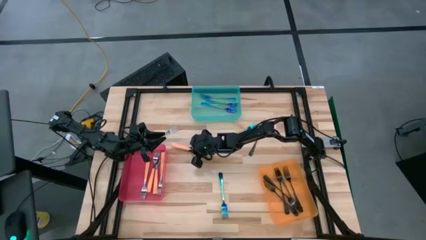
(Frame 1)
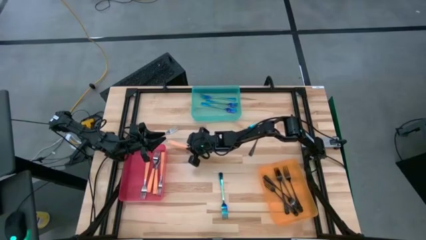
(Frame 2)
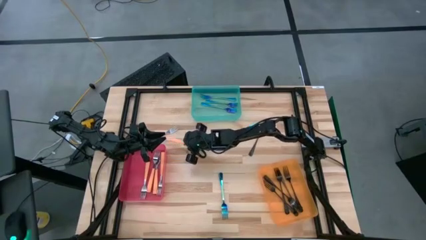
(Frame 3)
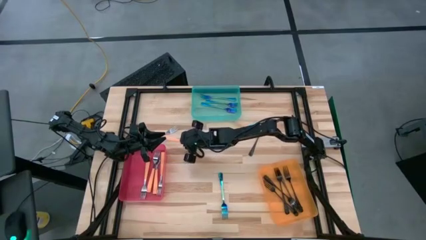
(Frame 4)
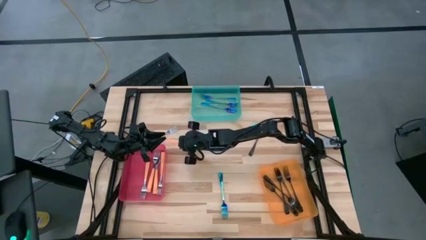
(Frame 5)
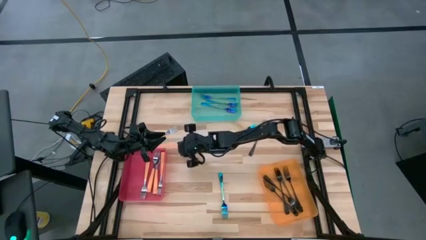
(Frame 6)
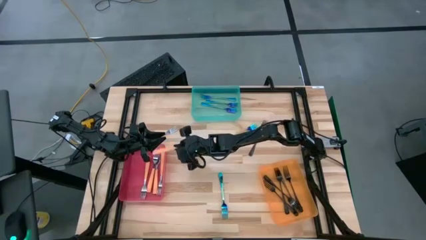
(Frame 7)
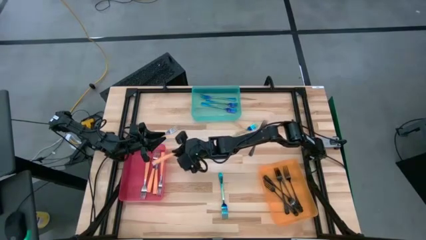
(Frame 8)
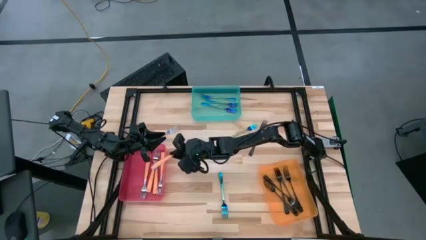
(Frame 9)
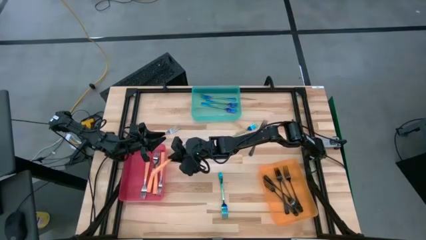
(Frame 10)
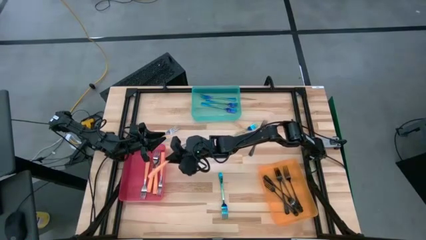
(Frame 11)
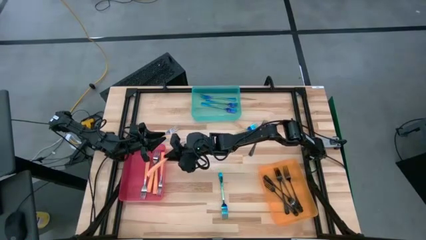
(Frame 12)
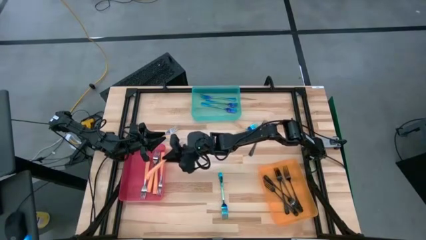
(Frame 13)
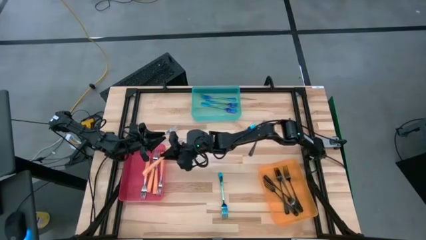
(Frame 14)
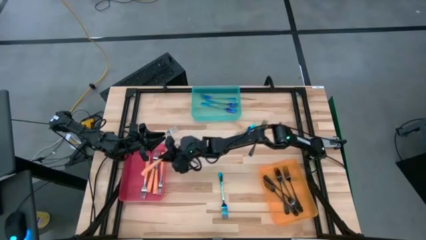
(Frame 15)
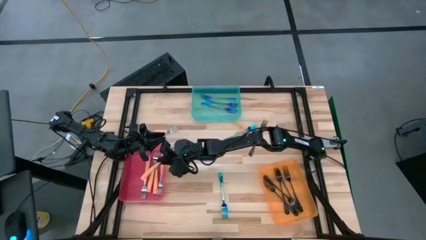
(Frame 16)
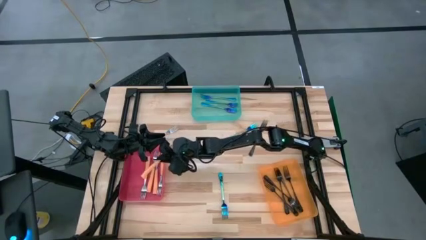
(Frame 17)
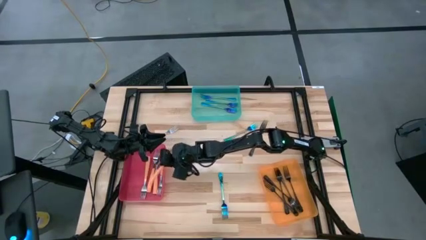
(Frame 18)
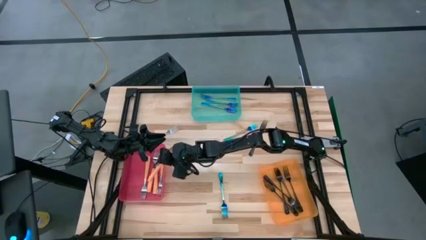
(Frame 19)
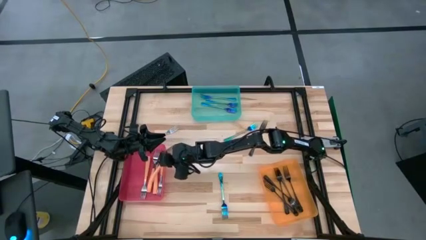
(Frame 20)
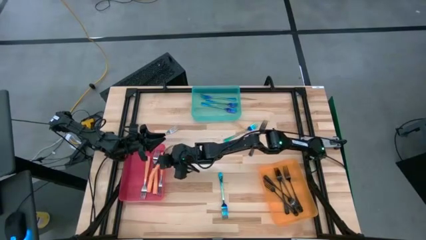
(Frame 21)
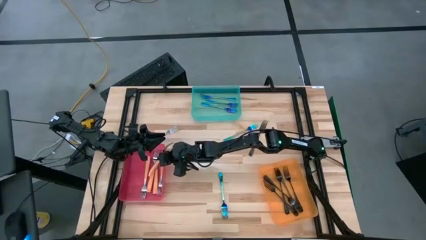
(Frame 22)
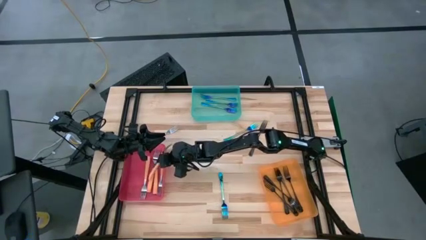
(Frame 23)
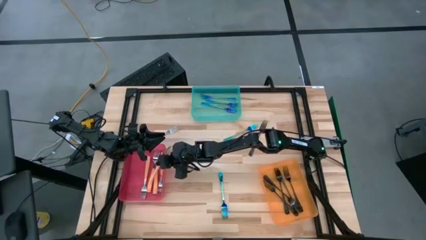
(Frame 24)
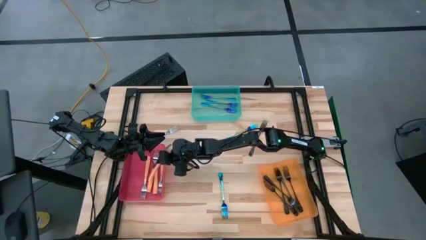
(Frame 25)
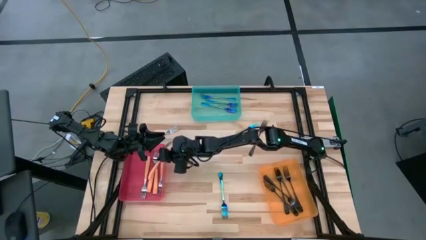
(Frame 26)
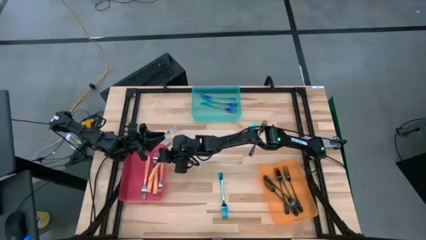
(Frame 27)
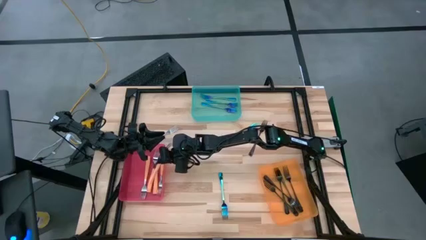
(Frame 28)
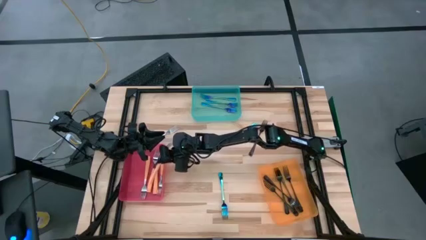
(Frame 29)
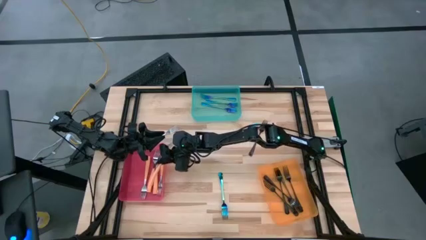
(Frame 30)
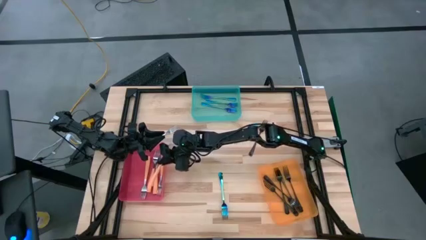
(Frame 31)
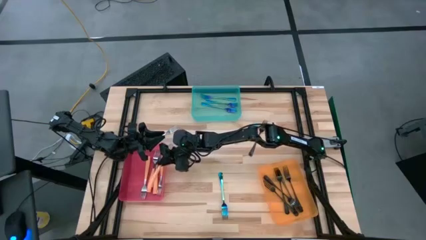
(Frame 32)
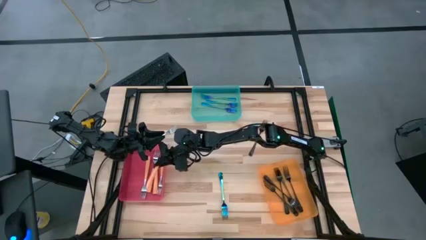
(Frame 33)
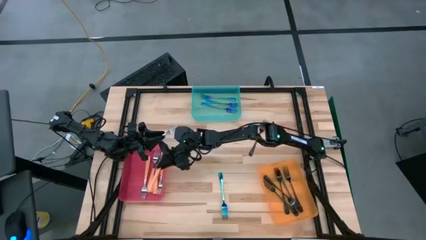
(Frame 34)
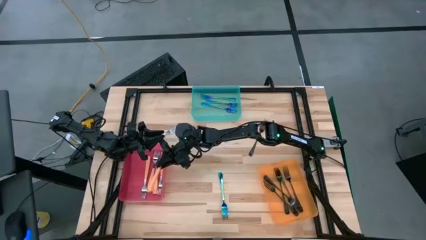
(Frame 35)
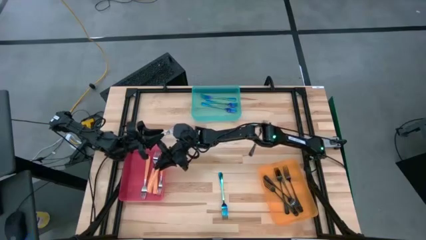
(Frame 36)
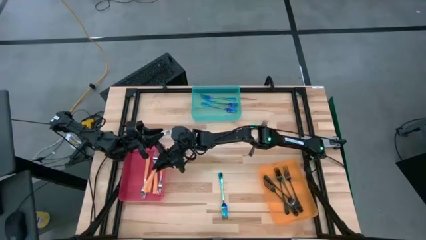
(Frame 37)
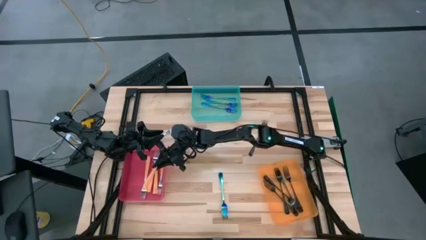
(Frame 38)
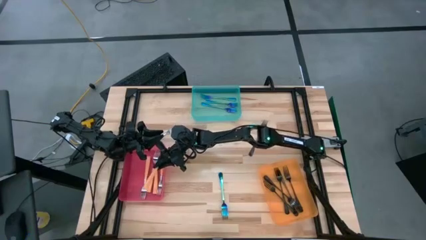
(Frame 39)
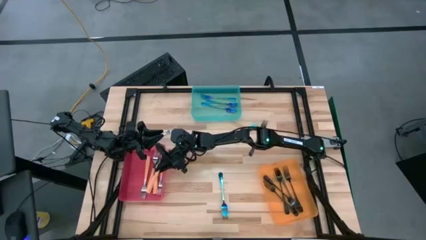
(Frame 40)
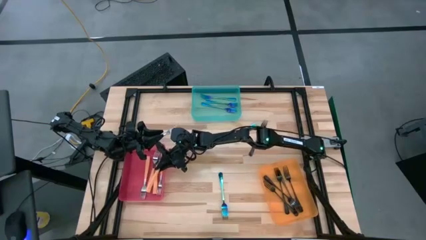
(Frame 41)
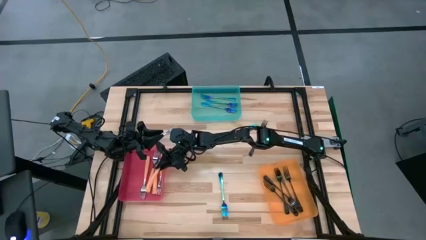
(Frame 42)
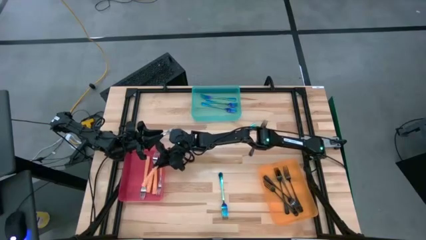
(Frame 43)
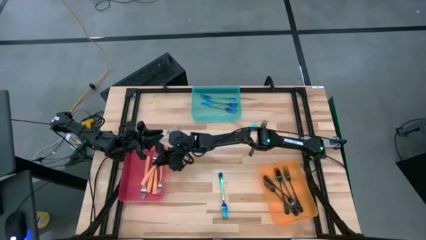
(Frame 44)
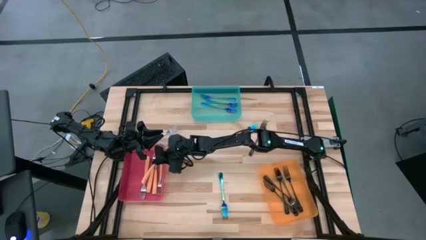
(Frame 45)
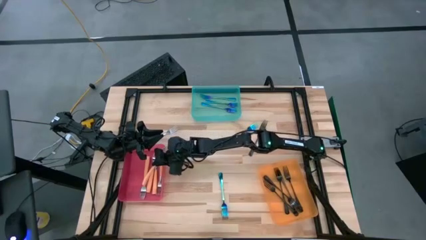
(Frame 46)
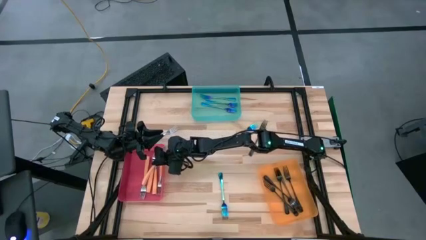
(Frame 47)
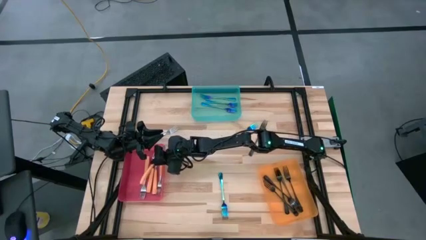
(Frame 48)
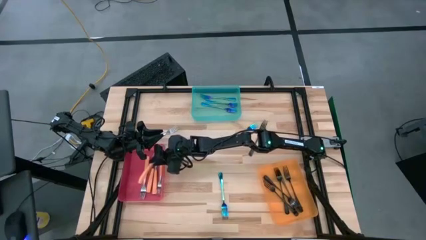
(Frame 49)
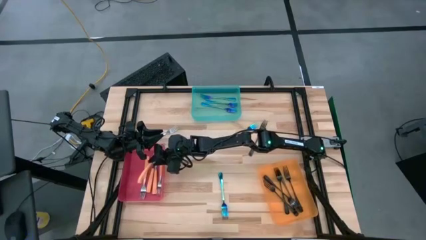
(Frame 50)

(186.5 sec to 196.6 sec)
Task: Sort silverware by color (type)
Put the orange fork into the red bin

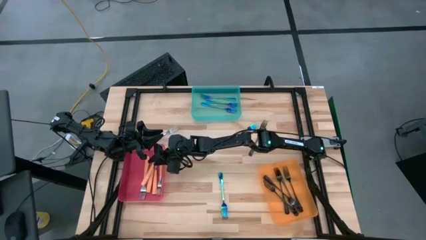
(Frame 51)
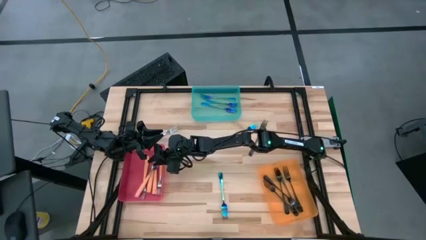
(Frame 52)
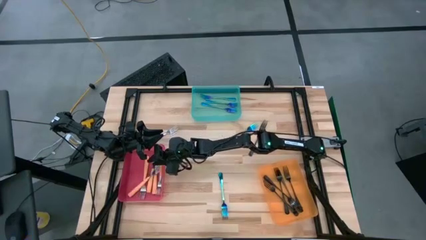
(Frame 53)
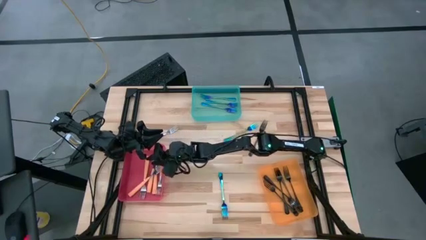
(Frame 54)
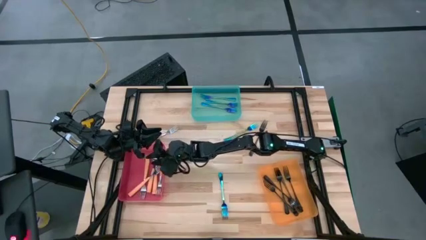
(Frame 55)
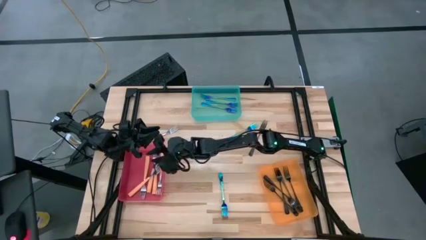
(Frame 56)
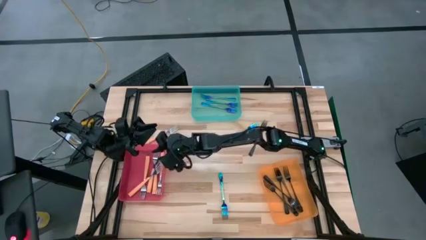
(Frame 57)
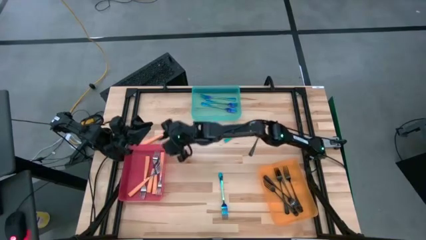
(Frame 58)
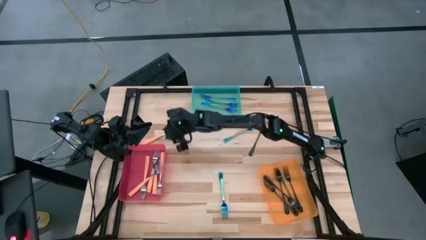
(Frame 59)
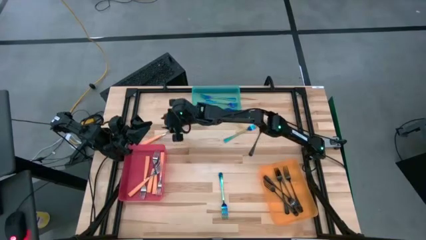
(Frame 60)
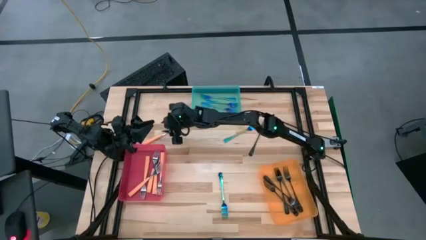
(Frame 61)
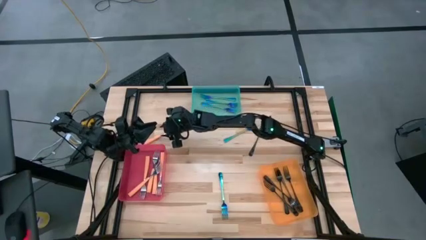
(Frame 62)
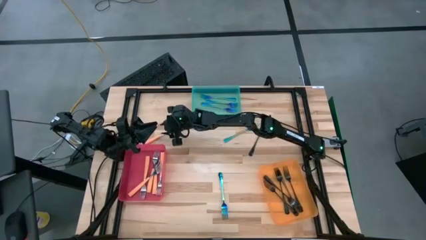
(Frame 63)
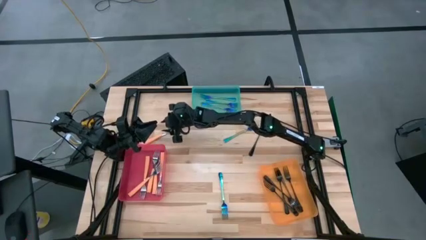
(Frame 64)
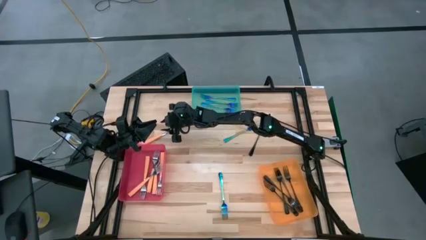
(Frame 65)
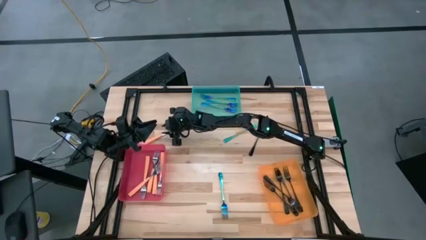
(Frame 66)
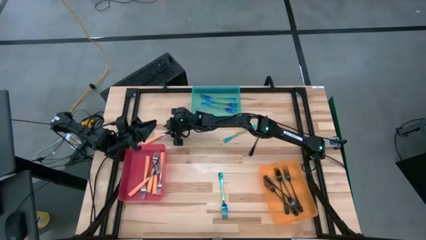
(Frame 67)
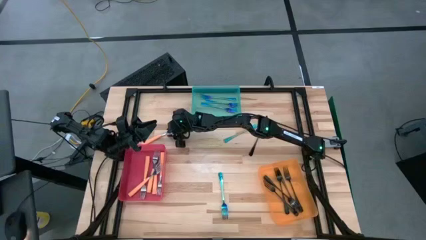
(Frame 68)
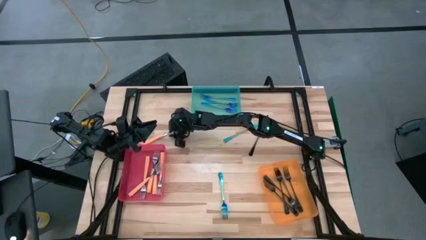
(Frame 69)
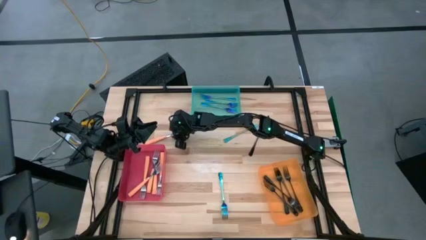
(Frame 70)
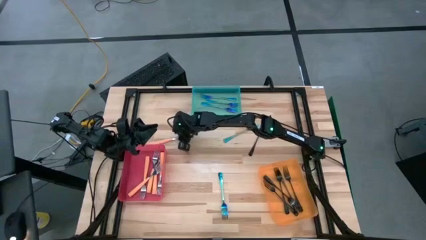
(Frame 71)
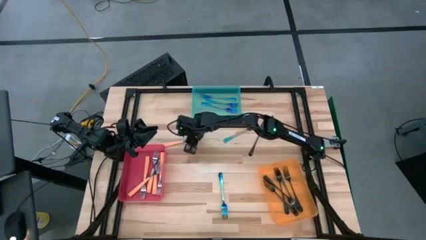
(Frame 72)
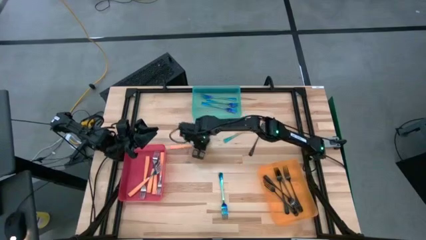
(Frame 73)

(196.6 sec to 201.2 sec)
Adjust the orange spoon on the table

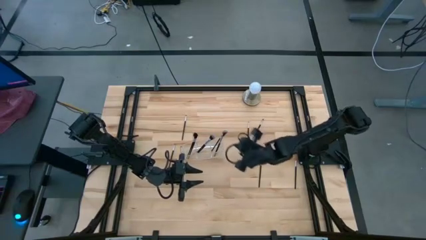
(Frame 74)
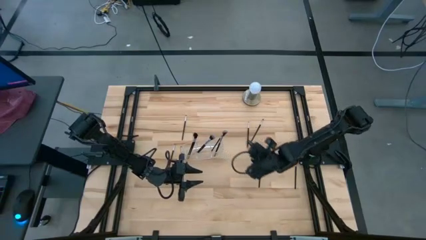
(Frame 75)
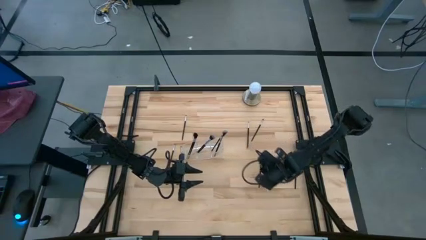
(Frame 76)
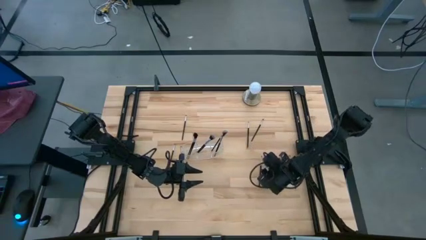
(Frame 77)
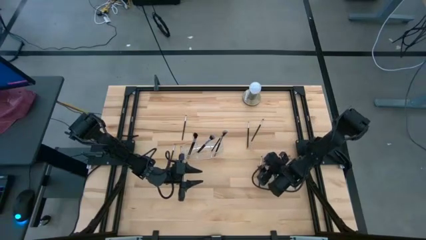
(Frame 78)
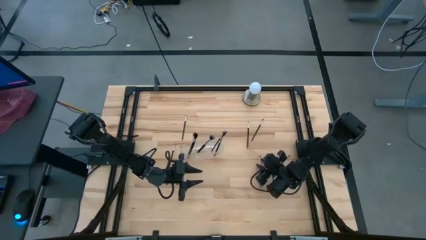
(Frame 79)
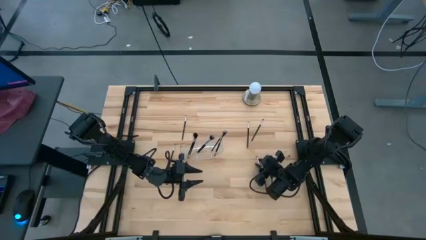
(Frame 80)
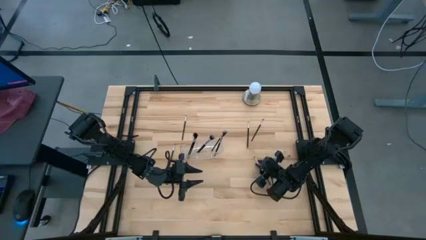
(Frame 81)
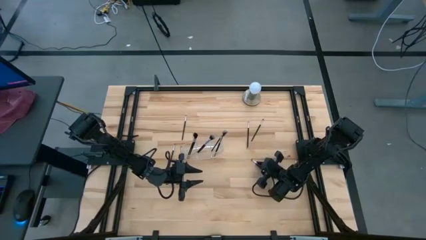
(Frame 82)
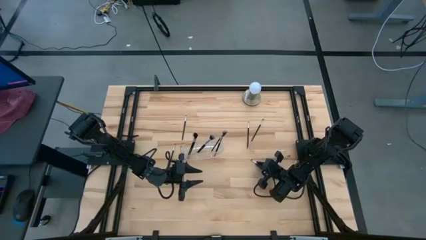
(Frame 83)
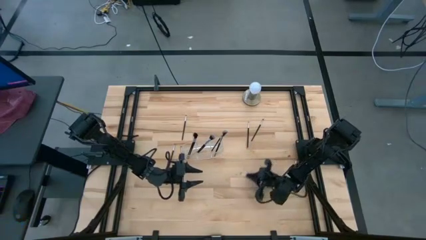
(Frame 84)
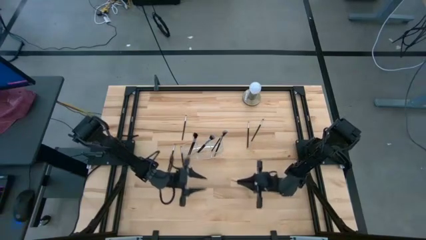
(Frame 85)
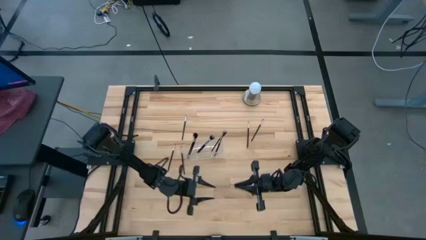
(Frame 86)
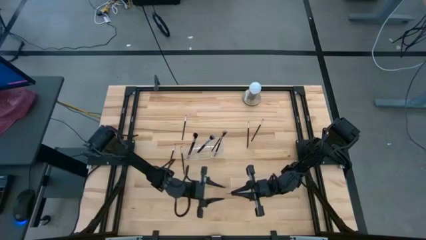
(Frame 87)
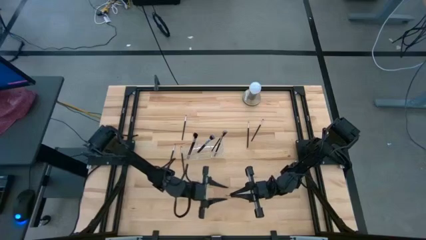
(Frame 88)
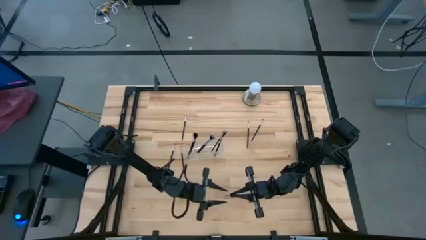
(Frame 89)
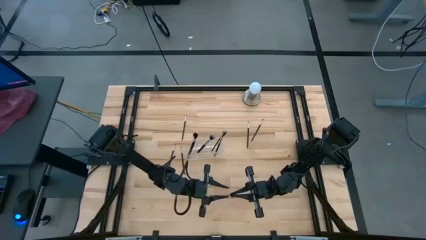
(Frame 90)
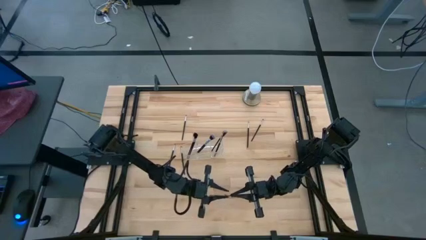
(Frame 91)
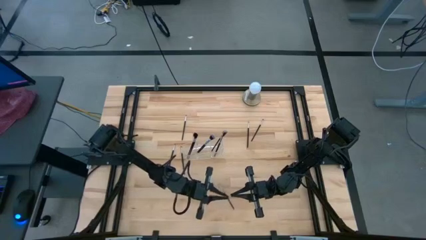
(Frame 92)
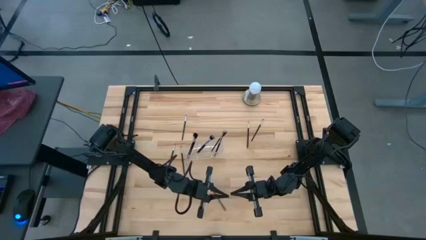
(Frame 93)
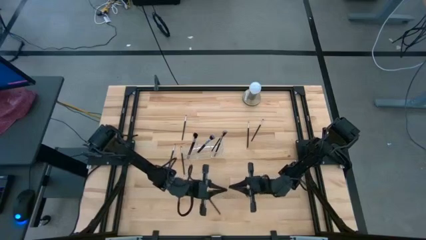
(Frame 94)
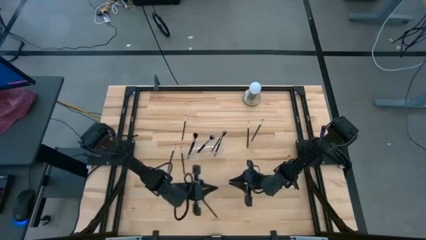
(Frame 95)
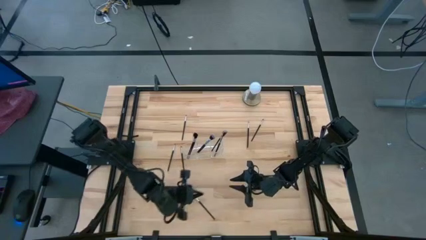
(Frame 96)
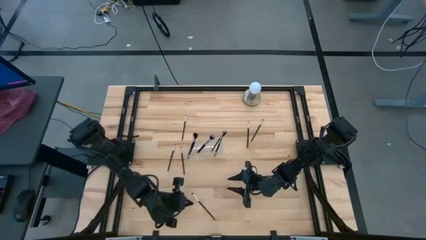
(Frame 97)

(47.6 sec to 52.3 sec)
Task: Put items in baskets/containers
Put the eyeshadow brush into the transparent organizer
